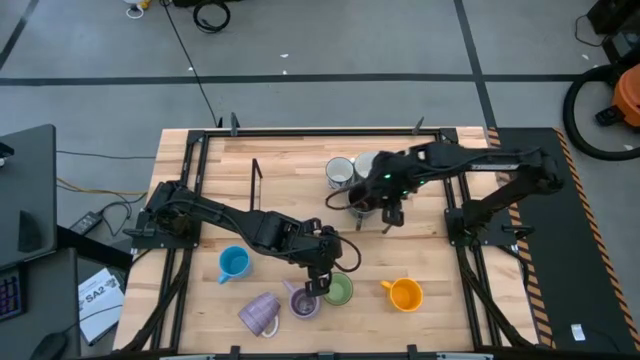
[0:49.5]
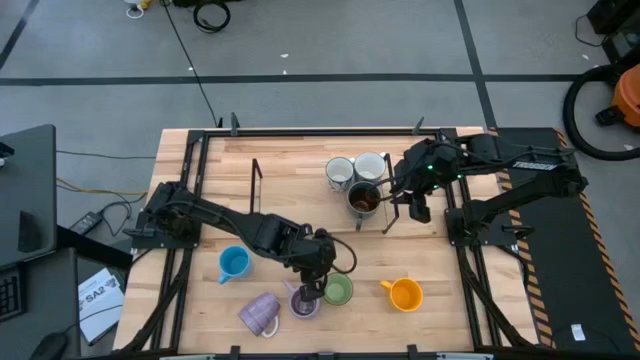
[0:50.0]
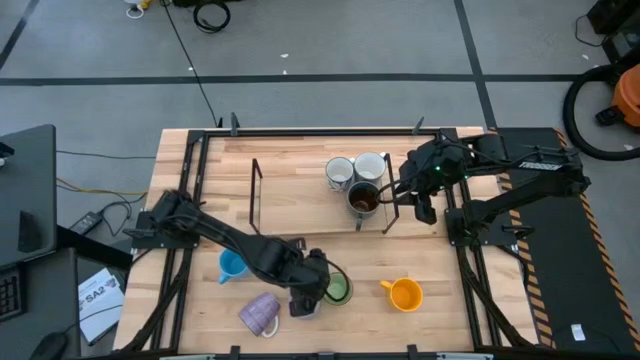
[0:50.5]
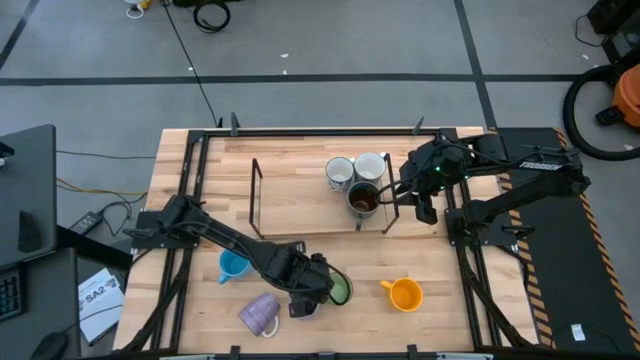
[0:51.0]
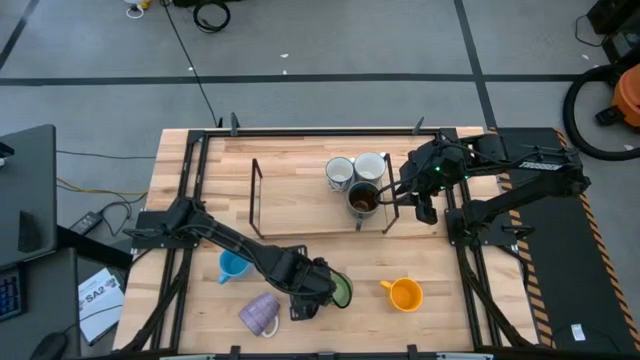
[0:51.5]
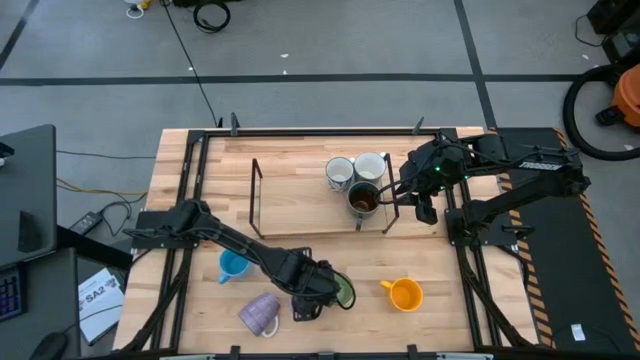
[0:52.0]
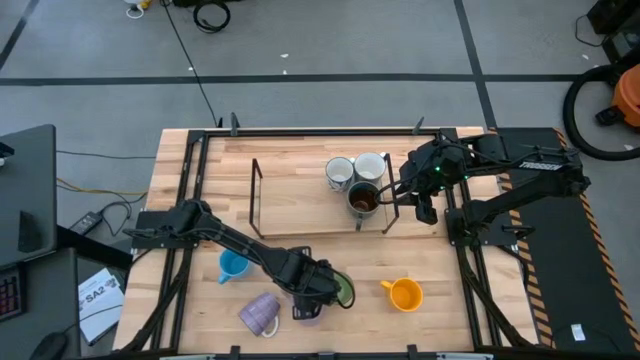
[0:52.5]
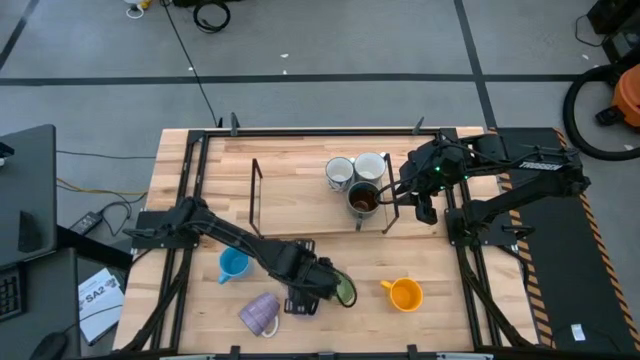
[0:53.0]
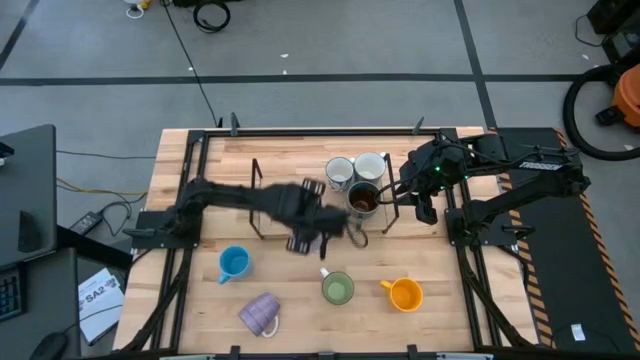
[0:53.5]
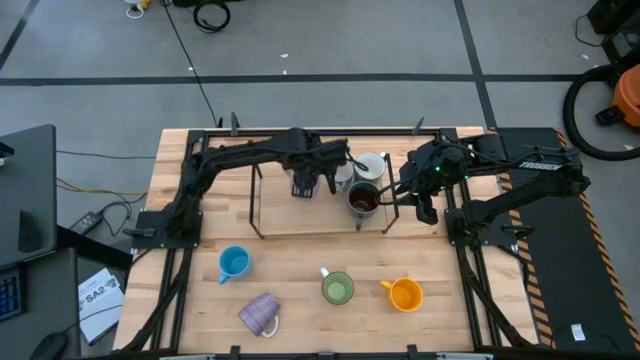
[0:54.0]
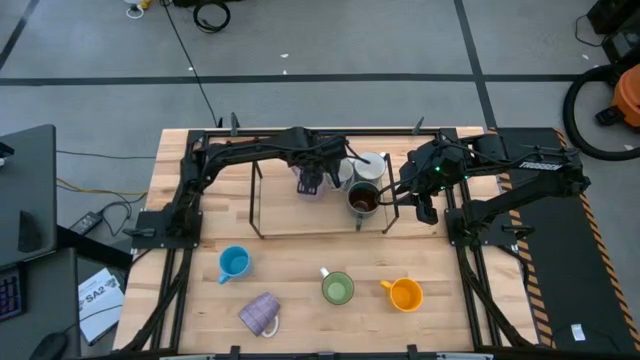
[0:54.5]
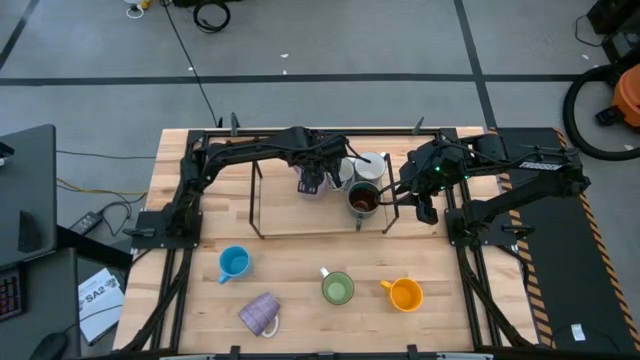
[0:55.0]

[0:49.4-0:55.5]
Task: Place coffee mugs
Put the right purple mug on the shelf
